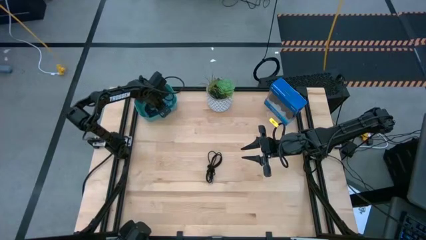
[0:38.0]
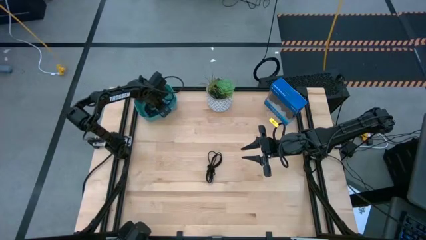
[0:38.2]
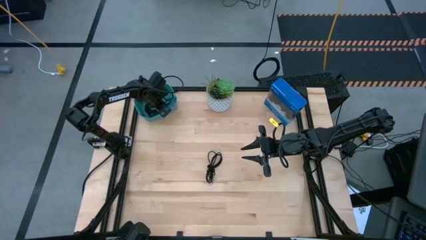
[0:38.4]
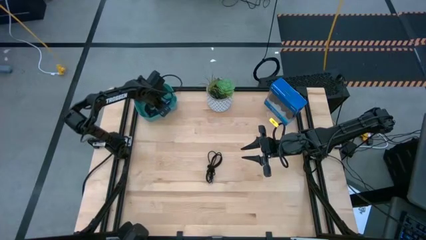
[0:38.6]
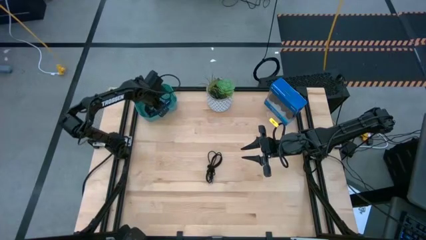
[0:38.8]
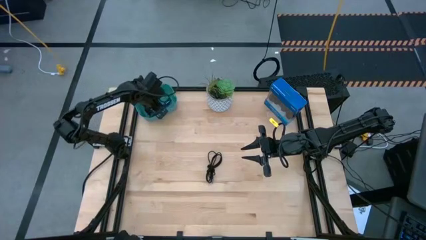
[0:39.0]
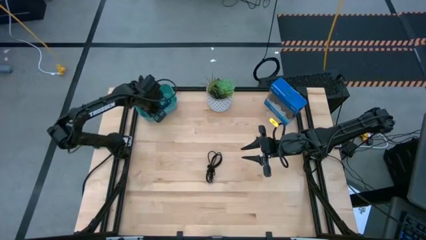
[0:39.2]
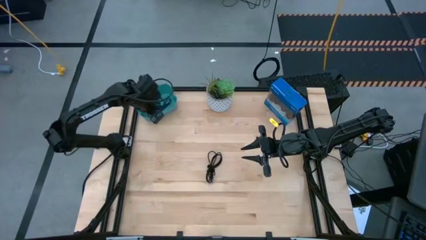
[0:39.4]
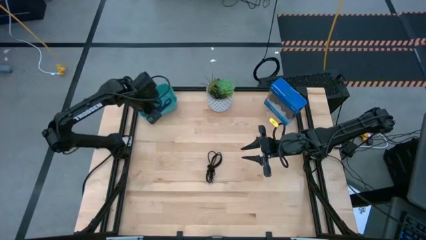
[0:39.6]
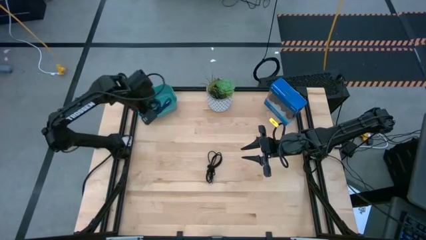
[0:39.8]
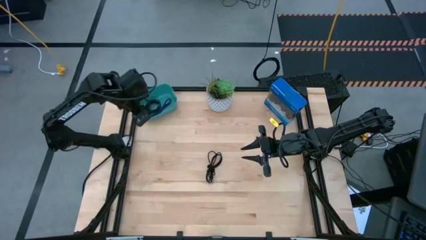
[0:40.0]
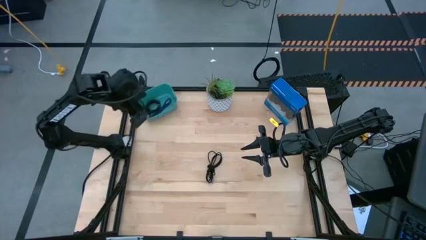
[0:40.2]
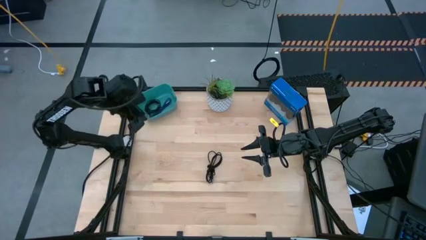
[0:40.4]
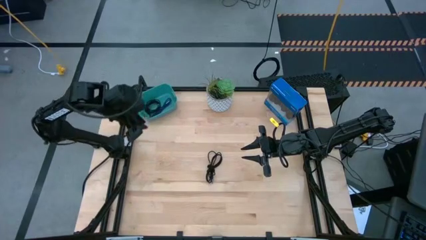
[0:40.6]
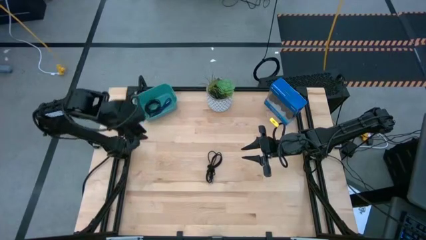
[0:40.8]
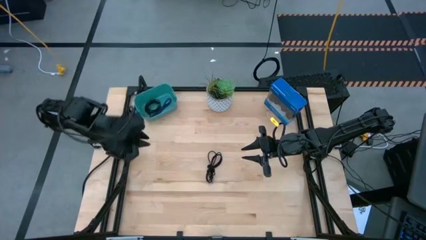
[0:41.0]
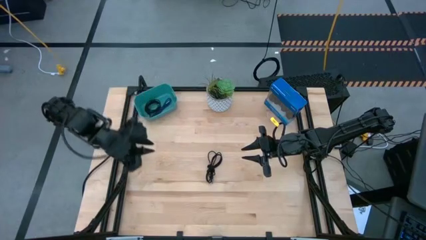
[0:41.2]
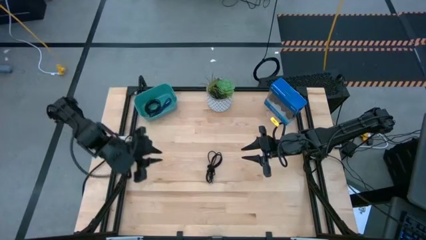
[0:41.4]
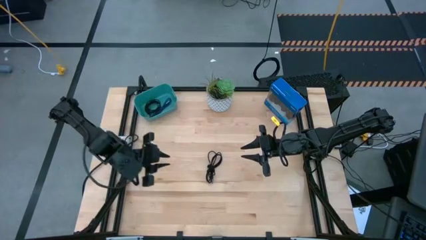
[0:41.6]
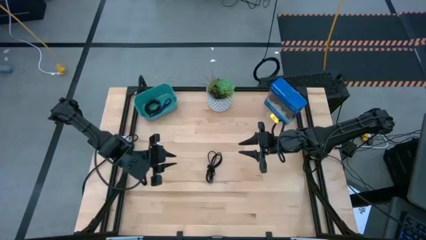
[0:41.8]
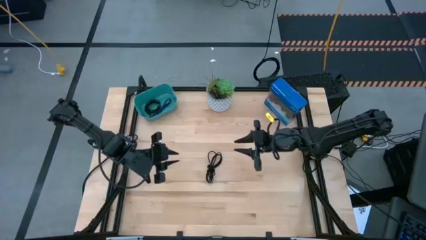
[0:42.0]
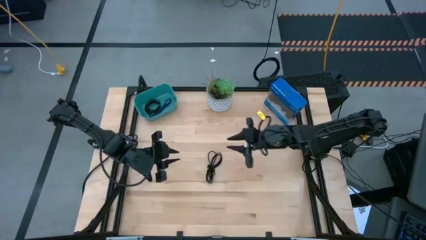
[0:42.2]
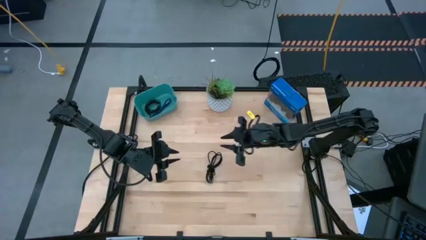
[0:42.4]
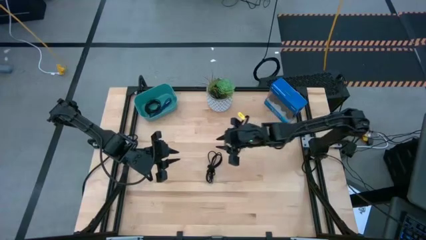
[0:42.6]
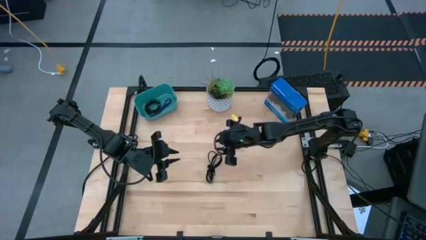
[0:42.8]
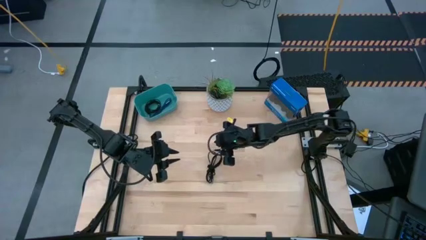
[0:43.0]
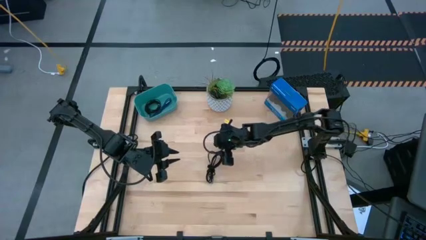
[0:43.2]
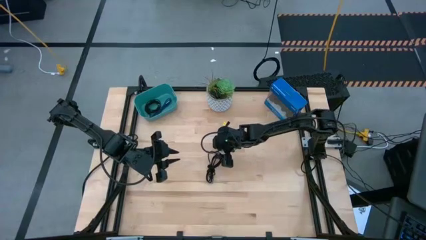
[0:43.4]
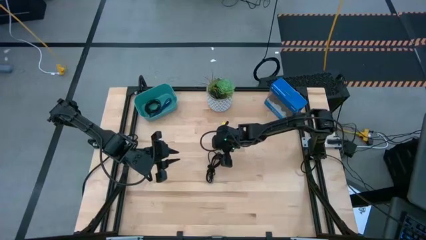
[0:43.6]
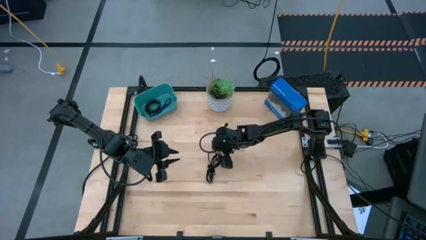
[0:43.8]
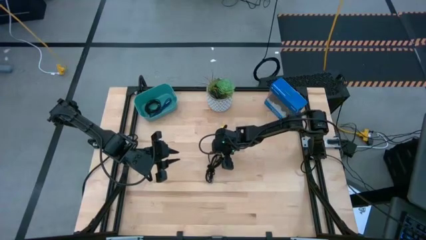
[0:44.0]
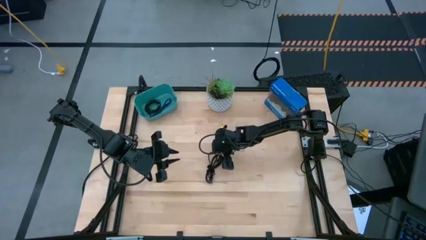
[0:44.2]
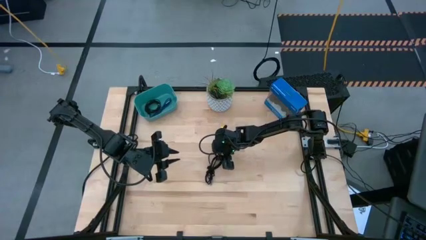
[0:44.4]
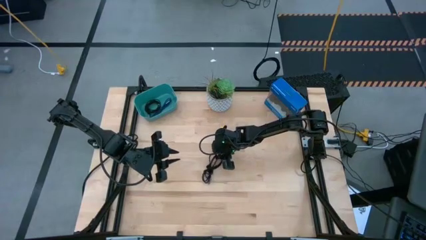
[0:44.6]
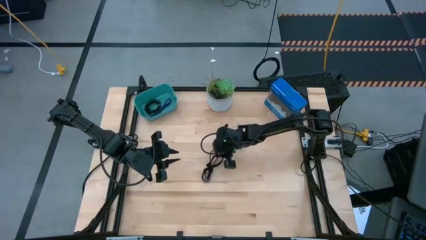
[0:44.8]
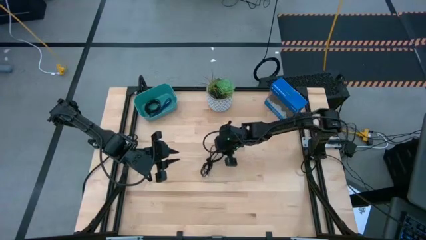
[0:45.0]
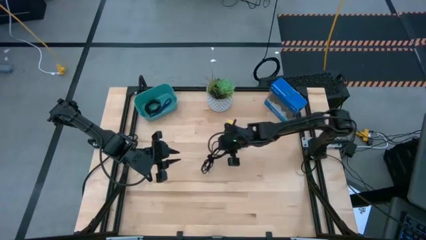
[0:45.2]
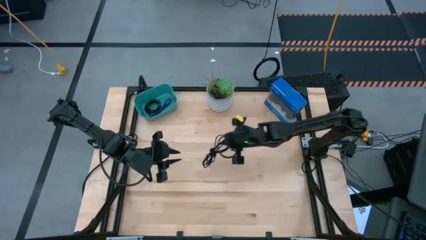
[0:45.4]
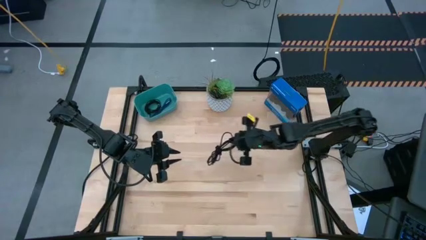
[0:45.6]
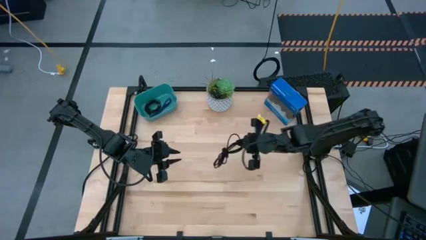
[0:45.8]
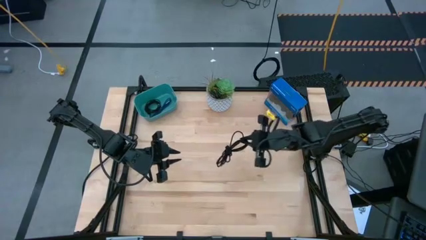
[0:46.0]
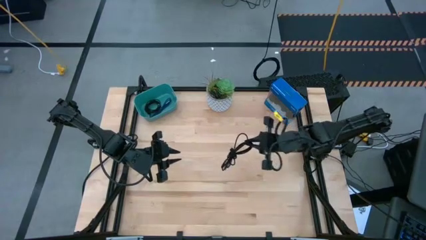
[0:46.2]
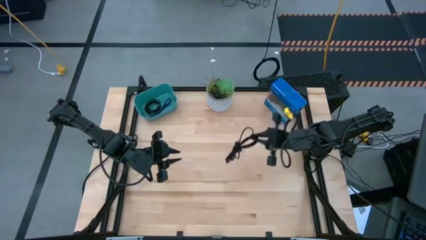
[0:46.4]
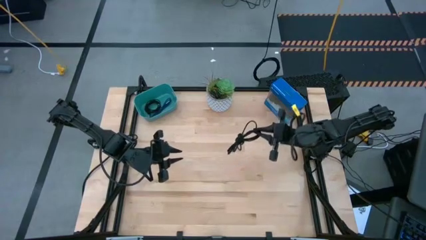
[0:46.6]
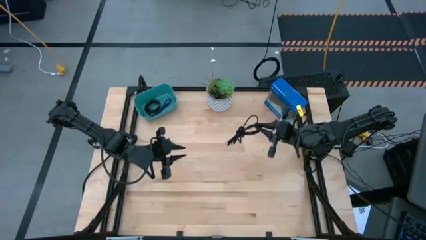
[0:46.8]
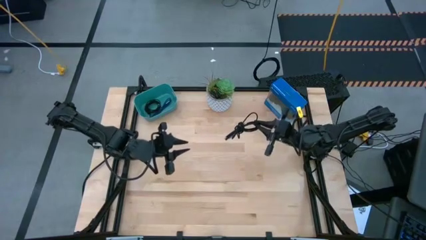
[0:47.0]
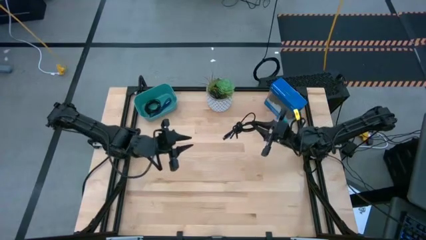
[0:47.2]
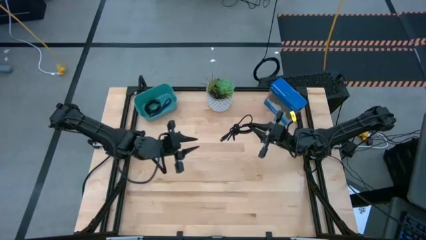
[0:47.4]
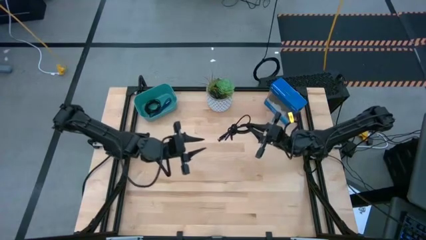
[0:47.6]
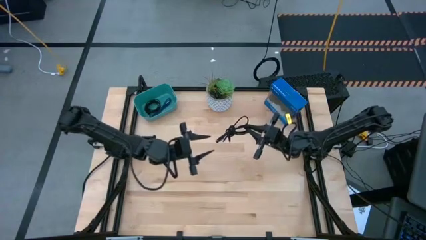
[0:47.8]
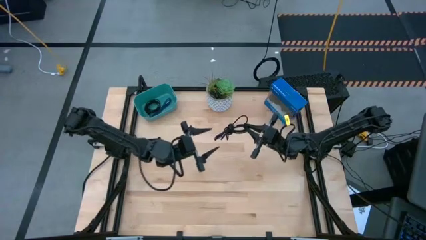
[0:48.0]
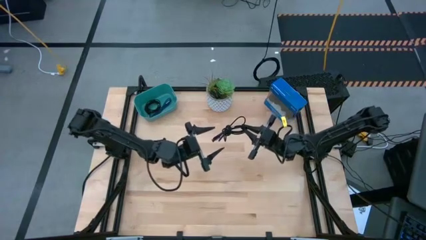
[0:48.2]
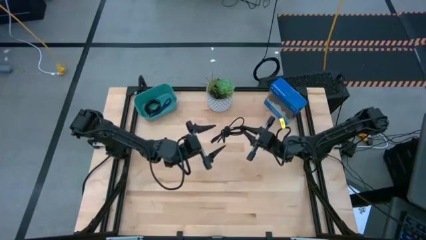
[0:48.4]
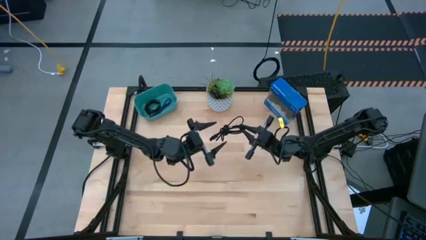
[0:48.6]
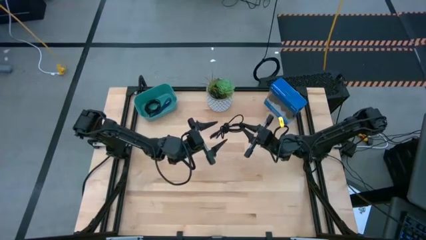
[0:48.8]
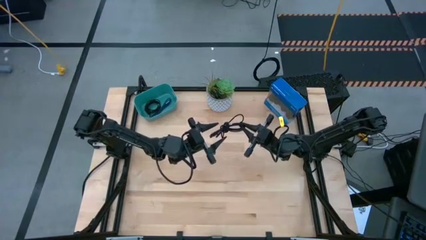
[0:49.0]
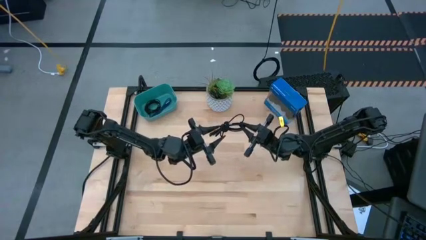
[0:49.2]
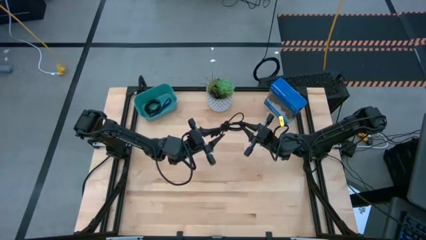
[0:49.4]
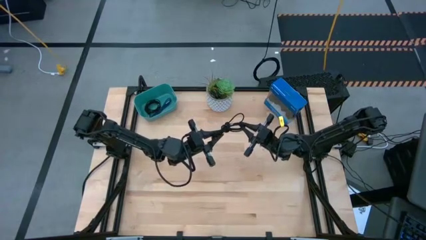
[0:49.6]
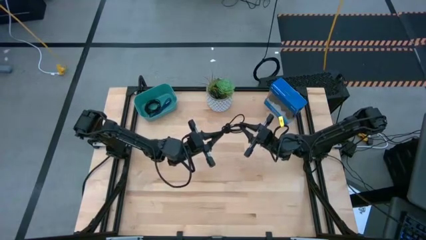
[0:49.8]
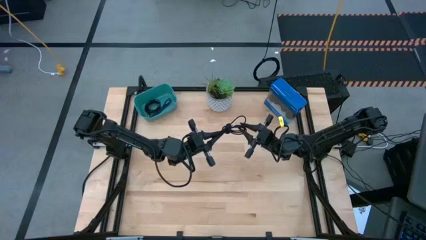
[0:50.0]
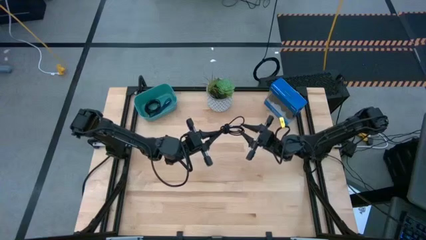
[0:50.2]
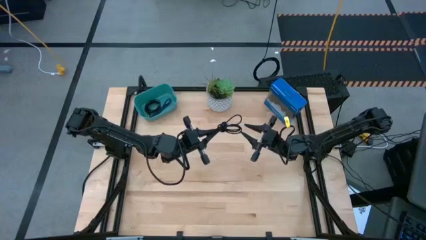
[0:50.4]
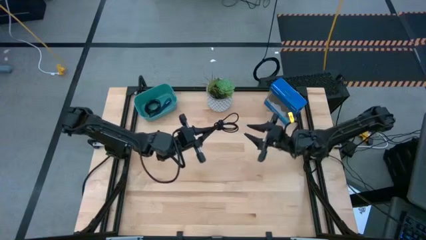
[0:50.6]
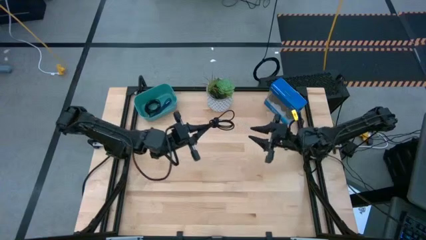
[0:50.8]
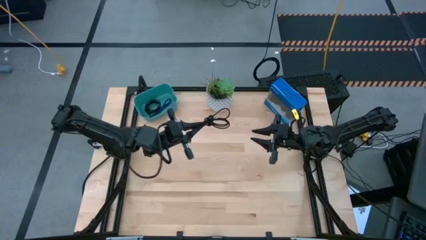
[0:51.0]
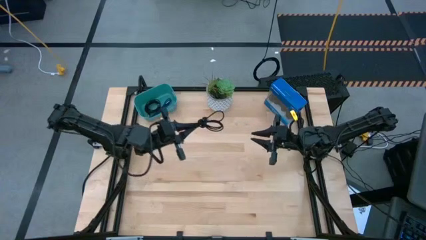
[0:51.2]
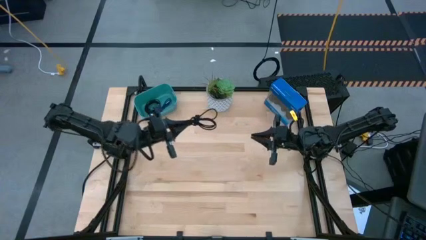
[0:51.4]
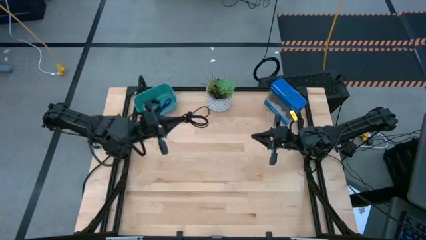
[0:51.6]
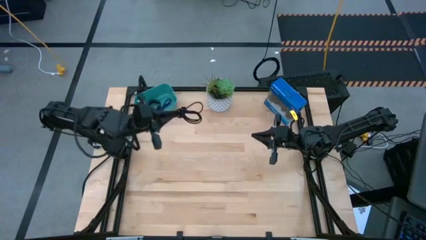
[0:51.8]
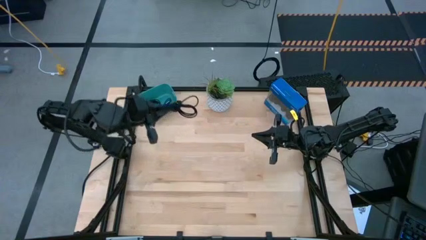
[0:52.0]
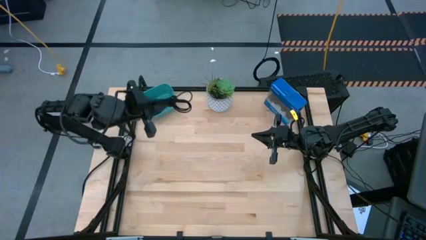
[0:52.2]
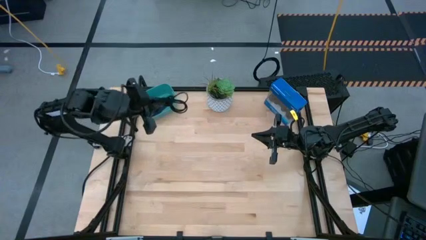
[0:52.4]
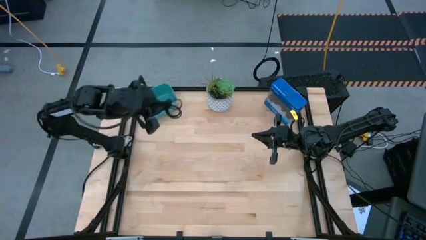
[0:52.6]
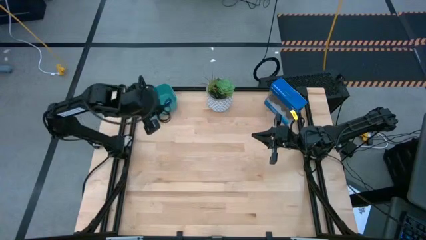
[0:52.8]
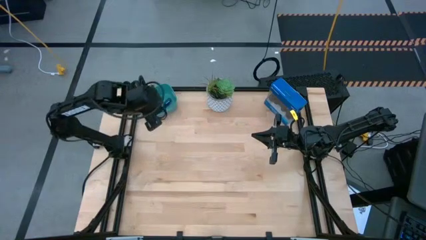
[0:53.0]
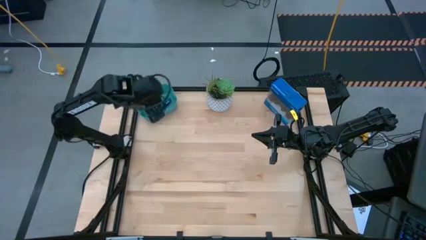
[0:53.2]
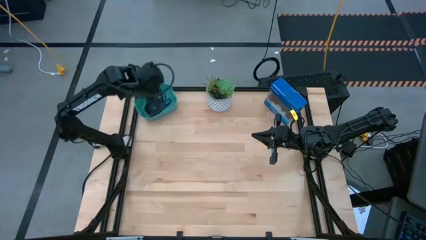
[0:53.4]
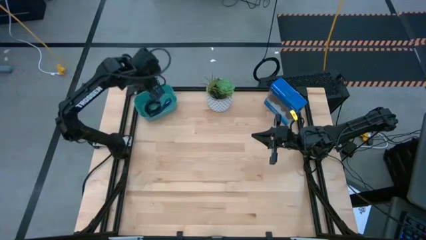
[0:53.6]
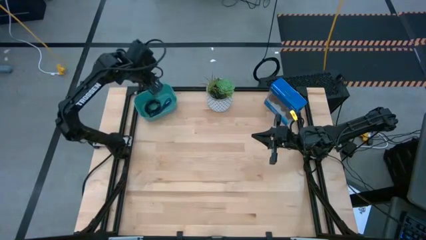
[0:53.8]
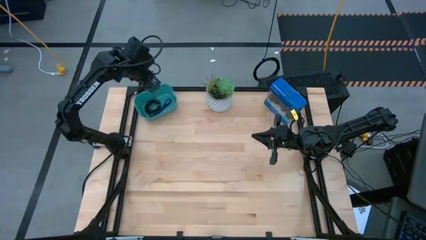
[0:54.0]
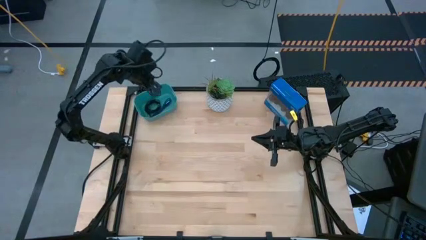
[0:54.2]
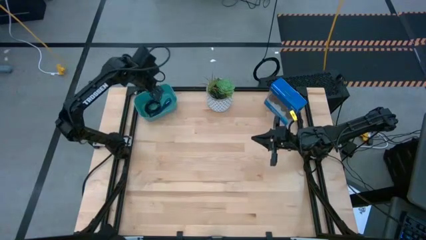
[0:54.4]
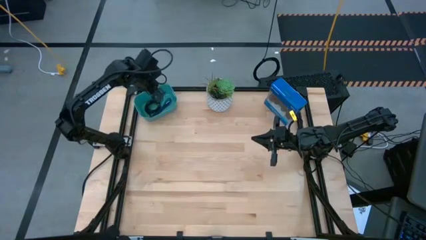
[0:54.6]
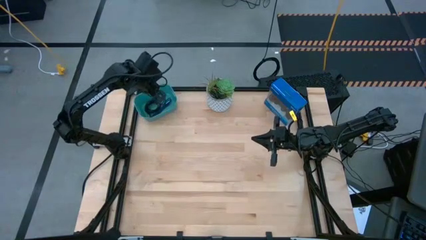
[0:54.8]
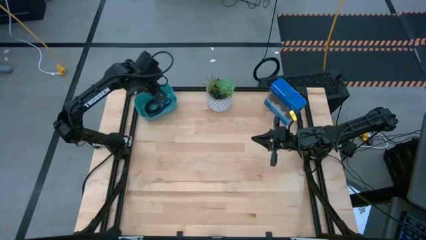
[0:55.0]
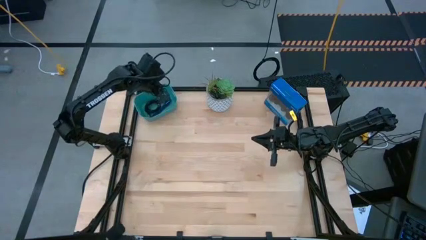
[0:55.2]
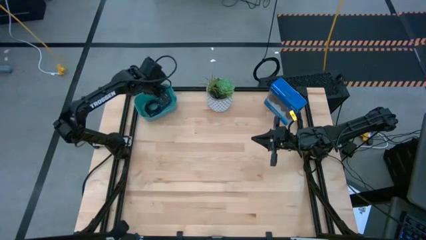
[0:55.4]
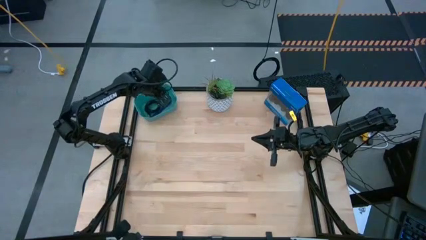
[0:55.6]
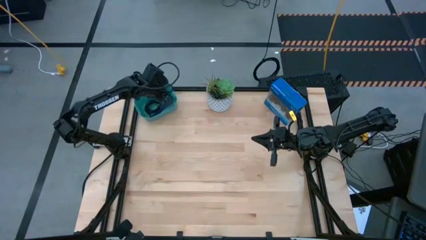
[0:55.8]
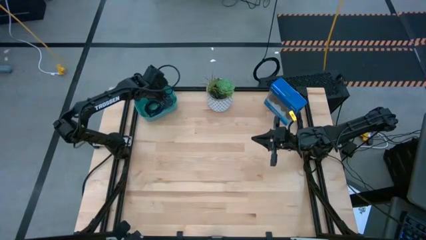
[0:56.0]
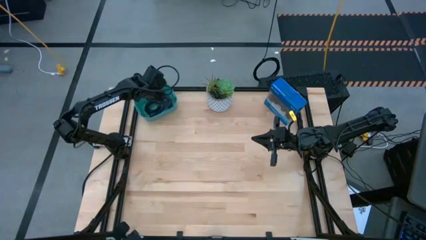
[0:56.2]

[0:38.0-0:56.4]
Task: Pick and place USB-C Cables
Put the black USB cable into the blue bin
